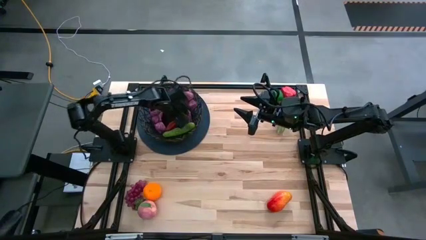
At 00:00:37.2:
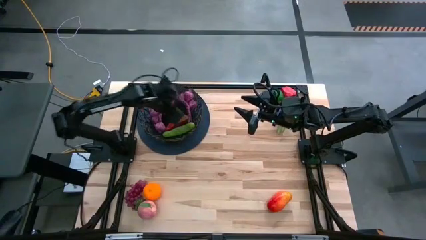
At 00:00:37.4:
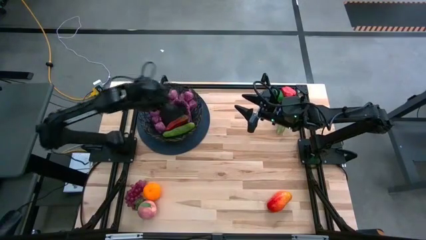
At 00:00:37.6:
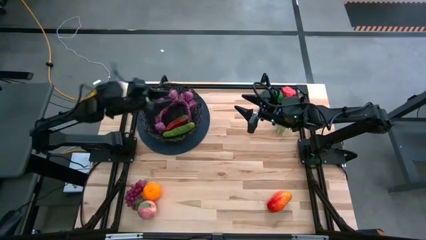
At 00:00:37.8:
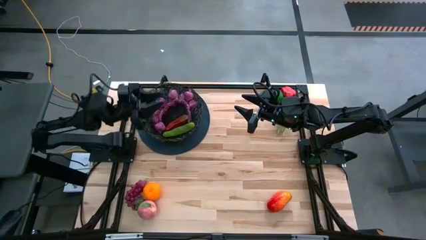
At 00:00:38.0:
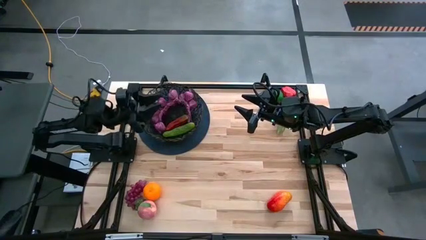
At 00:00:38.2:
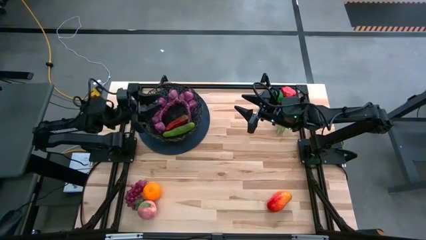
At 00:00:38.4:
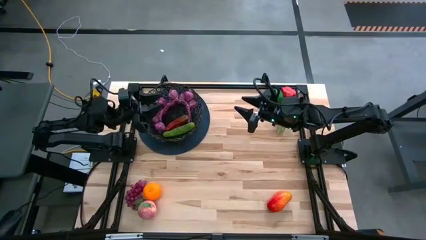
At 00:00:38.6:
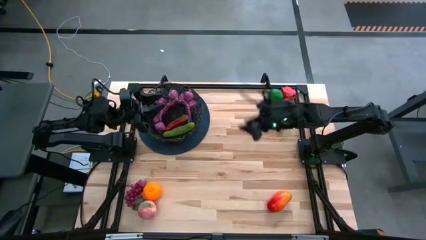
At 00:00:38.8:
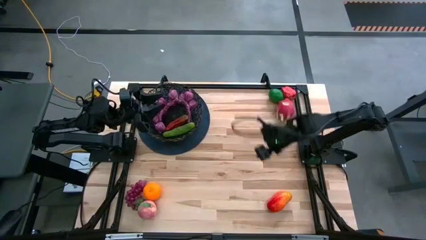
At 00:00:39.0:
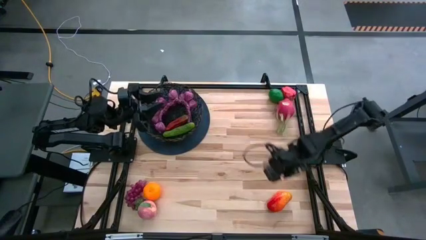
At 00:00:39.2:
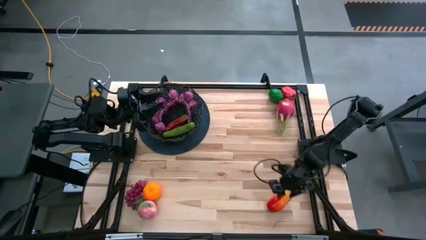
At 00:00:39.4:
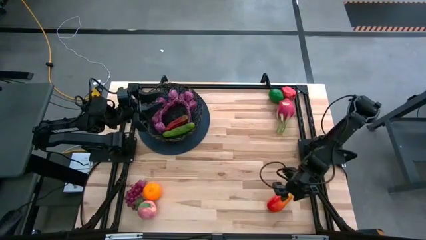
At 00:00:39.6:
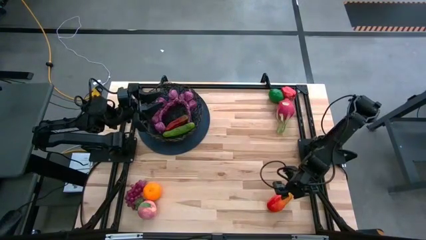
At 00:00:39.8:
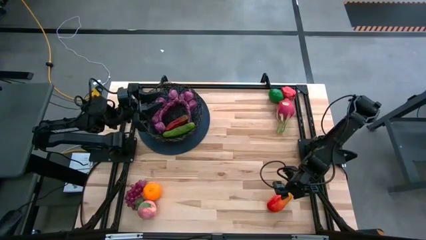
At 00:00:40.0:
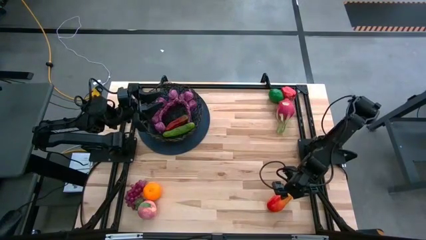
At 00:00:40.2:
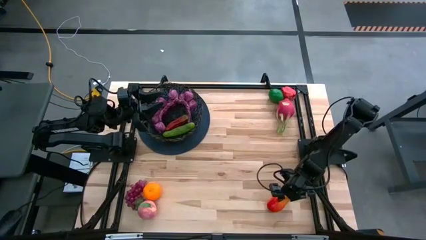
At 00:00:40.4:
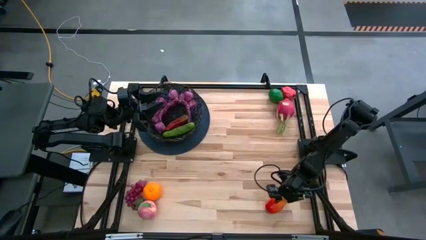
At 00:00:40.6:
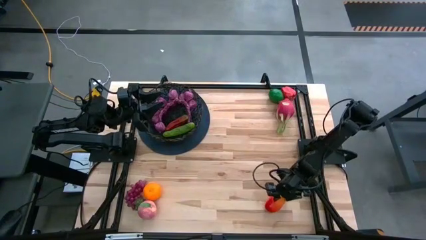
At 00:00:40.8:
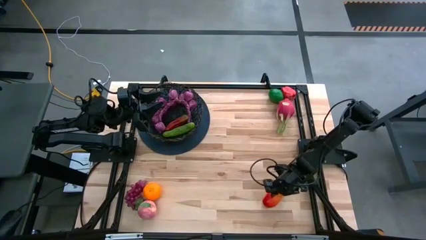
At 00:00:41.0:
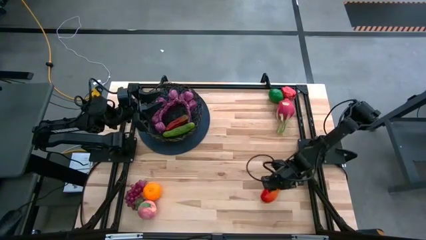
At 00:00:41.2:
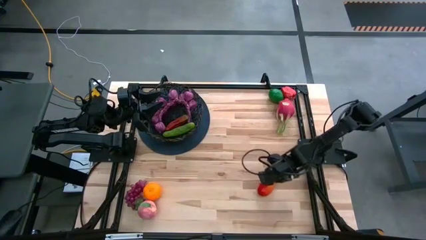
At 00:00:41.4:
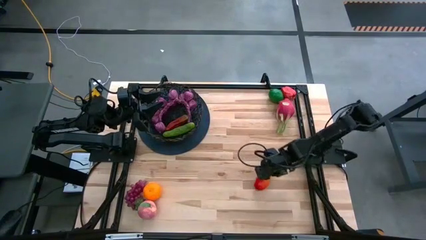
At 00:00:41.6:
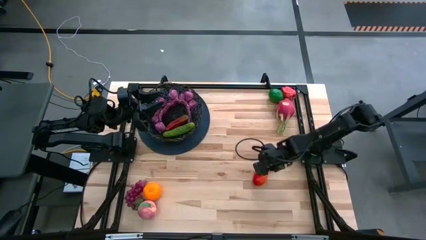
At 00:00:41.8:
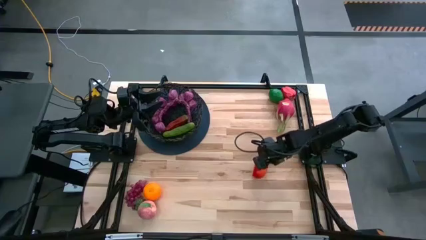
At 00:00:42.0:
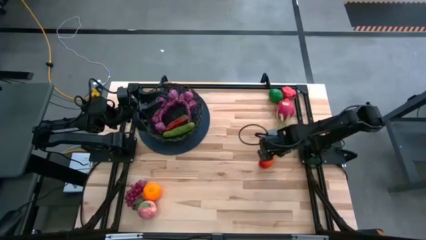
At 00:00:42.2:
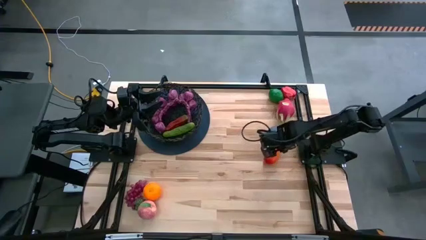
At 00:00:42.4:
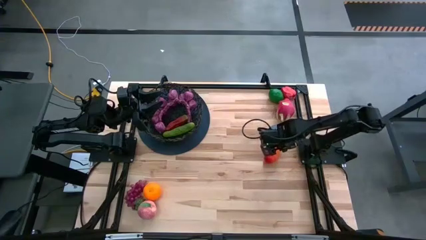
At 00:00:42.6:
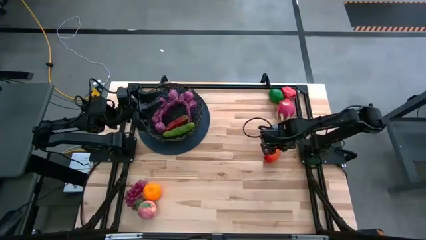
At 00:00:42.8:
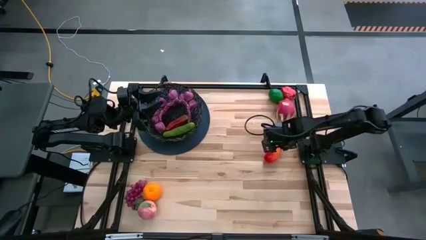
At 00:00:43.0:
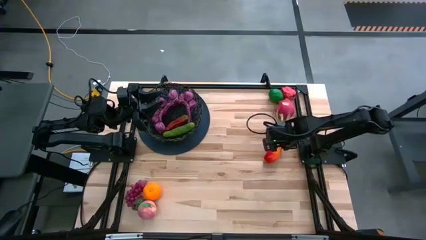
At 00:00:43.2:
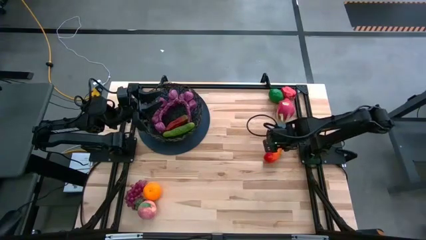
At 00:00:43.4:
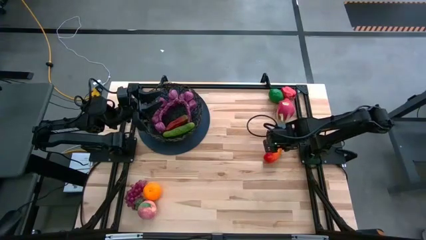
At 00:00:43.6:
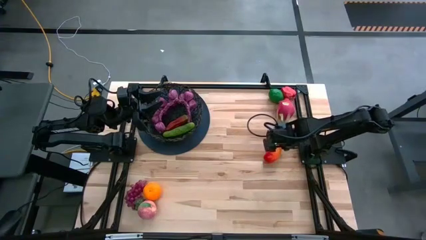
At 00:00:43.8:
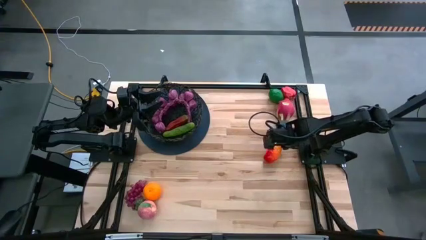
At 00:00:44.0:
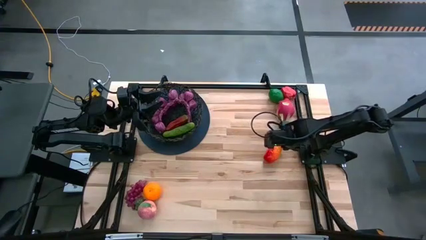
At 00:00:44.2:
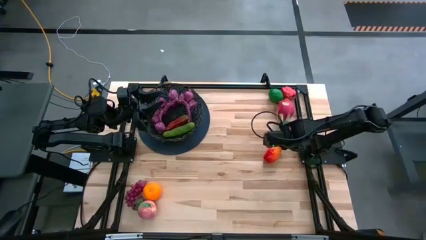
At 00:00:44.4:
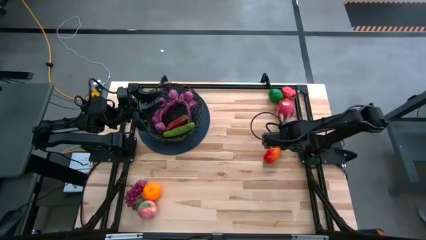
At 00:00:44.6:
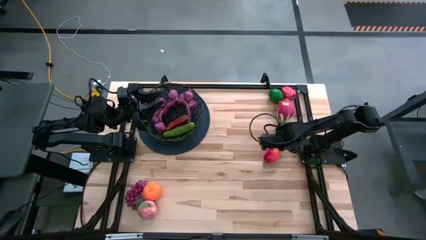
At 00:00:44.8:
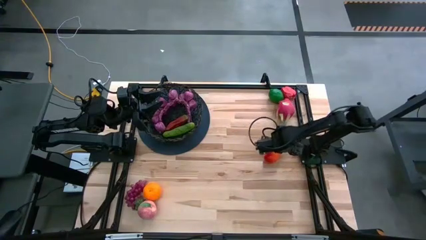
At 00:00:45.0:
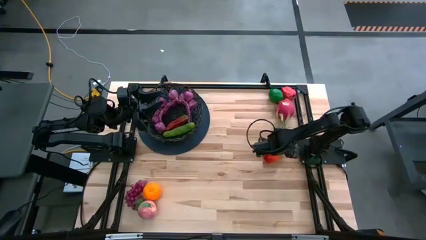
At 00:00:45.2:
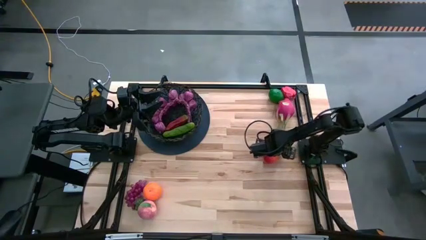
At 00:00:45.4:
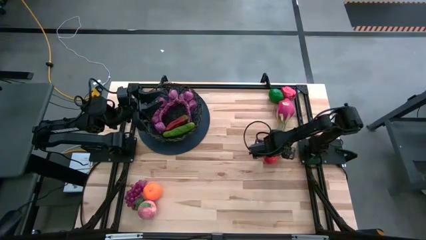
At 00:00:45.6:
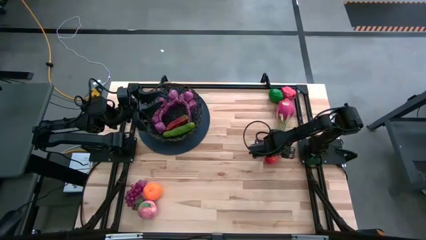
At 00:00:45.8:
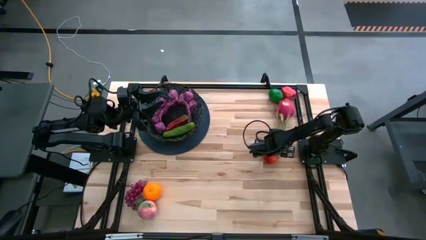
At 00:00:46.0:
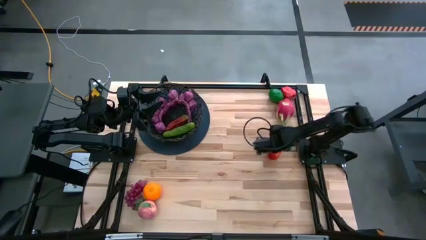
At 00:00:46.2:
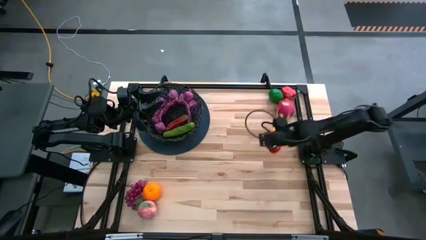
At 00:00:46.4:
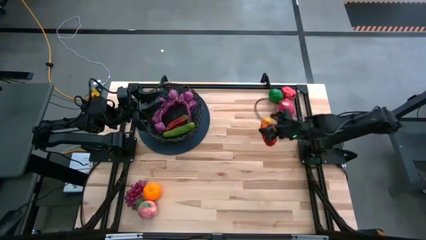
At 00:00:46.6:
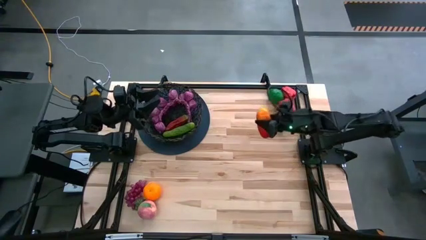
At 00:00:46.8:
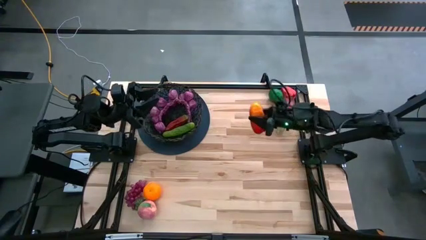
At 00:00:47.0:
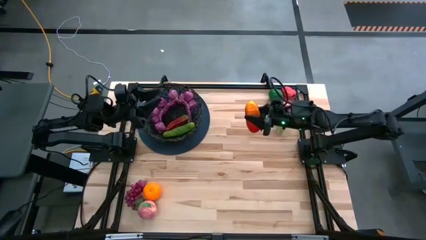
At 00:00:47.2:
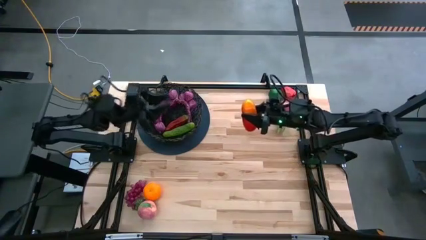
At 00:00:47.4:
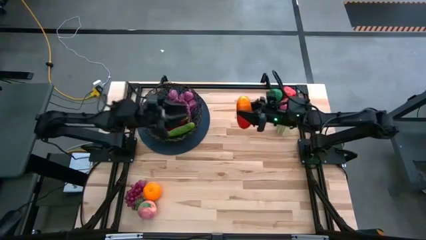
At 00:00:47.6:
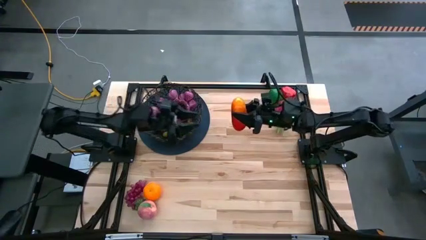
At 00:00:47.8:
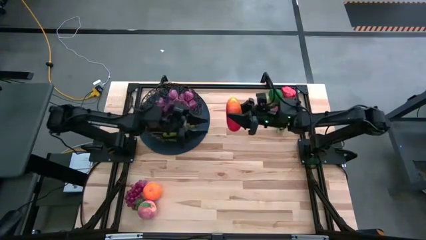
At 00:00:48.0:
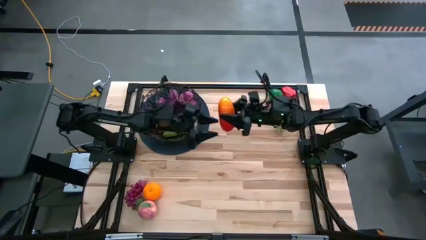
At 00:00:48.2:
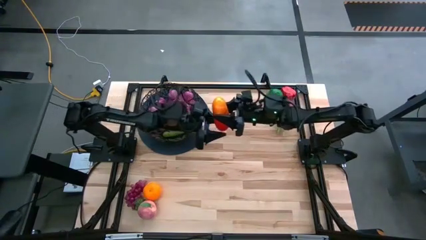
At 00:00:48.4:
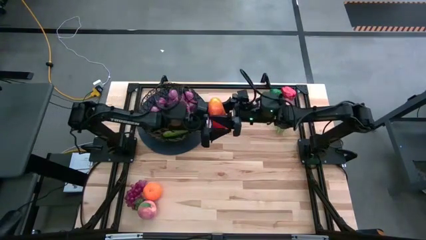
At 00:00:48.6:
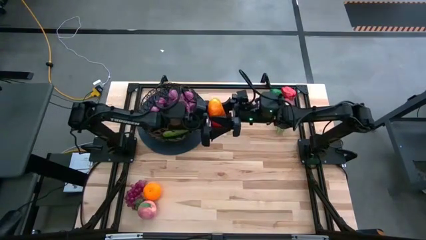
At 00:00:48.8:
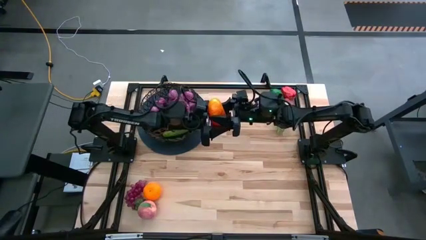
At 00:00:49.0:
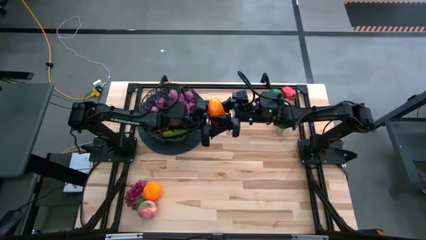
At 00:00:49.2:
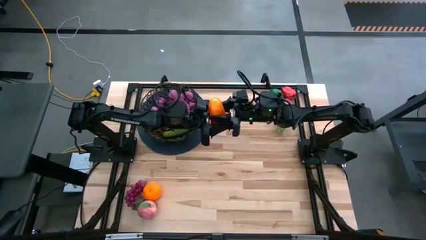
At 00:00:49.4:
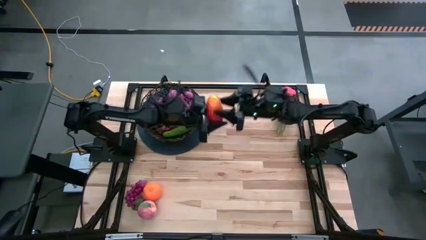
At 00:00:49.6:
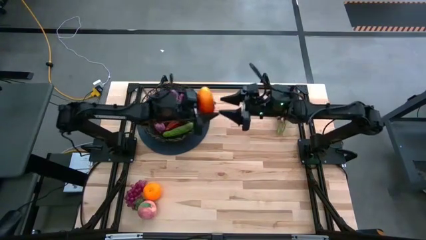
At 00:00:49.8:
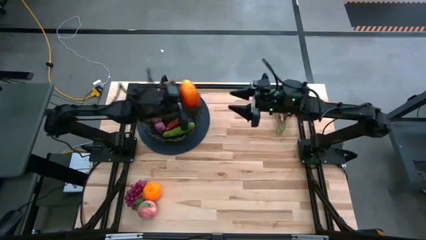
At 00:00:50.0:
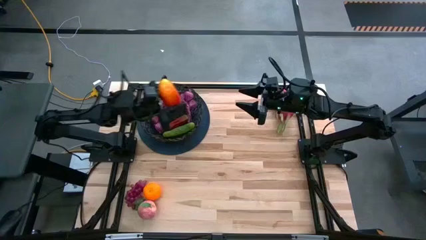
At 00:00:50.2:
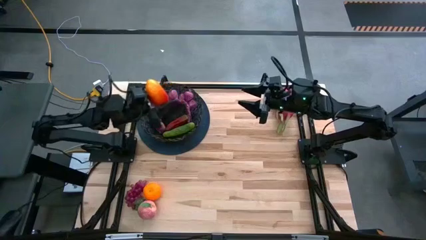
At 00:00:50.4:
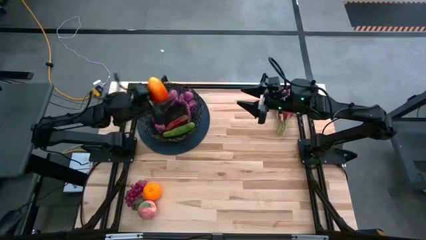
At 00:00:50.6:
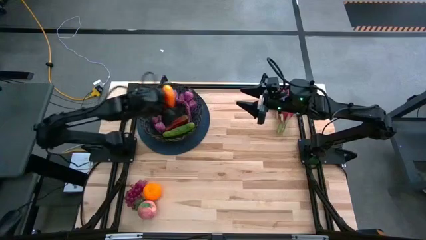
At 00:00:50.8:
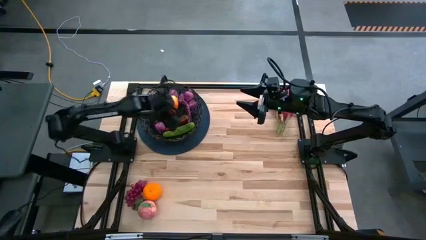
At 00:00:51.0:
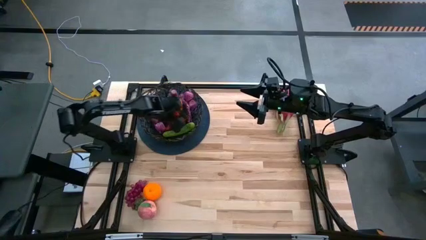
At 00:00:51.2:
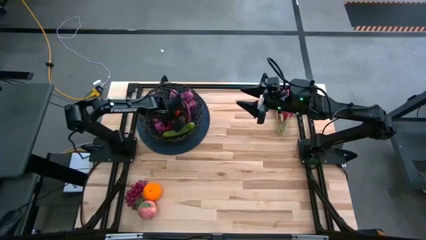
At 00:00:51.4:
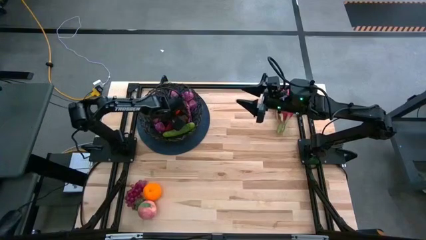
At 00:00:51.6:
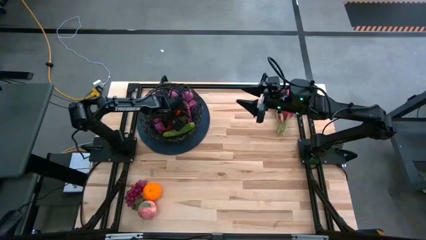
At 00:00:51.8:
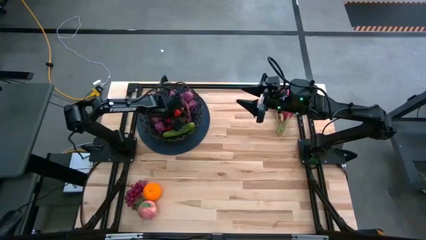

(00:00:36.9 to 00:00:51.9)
Task: Build produce basket
Put the red mango into the black wire basket
